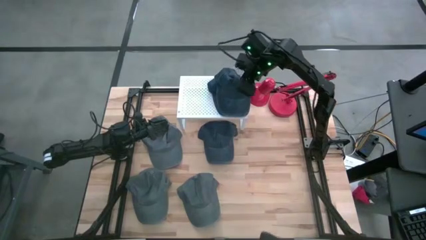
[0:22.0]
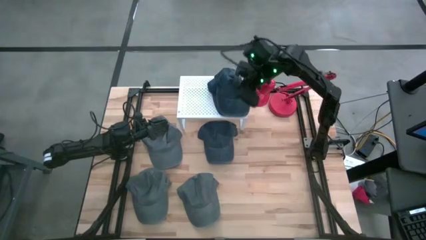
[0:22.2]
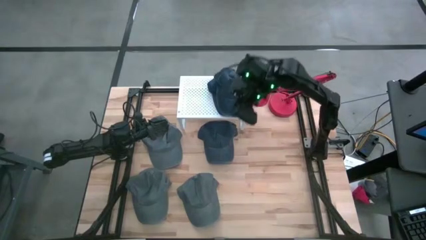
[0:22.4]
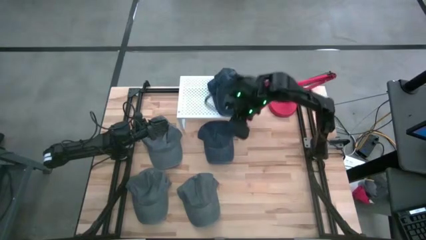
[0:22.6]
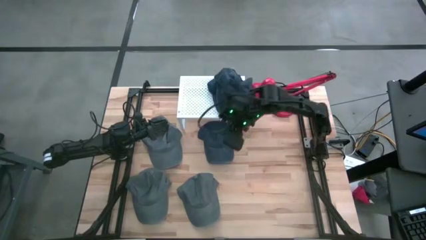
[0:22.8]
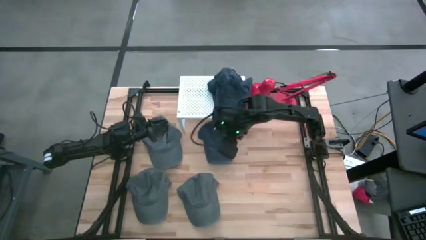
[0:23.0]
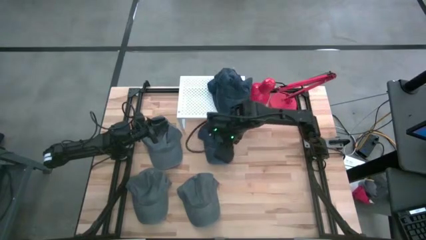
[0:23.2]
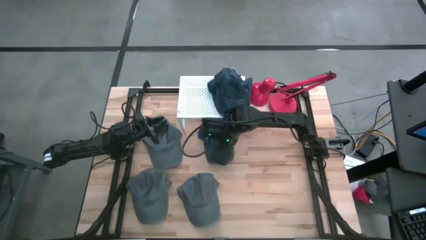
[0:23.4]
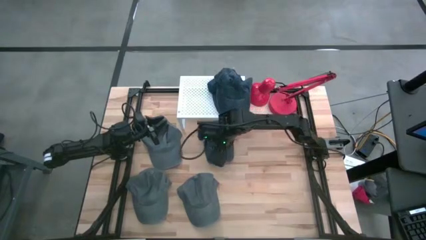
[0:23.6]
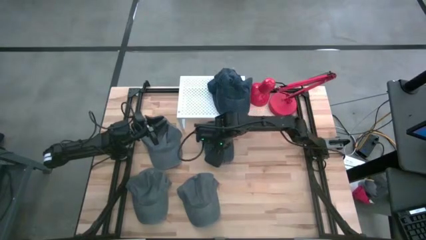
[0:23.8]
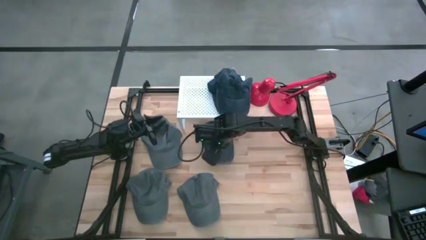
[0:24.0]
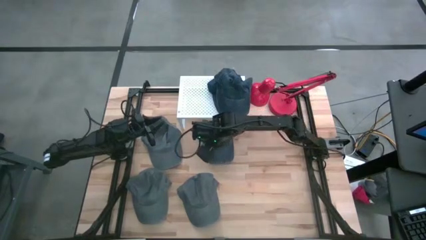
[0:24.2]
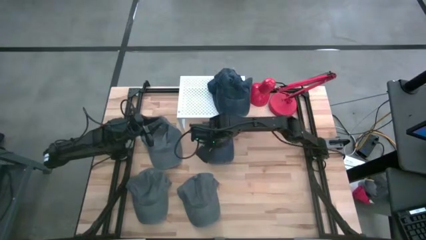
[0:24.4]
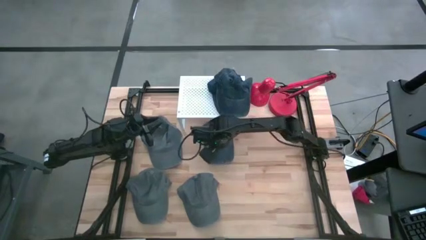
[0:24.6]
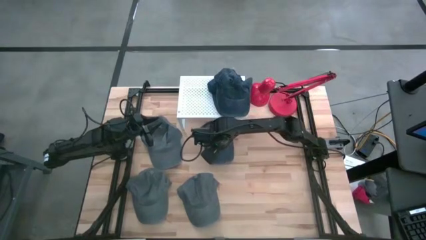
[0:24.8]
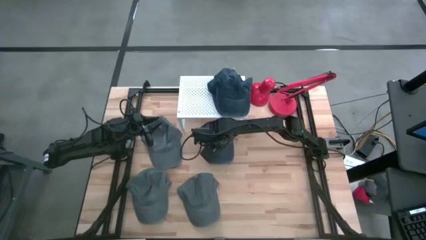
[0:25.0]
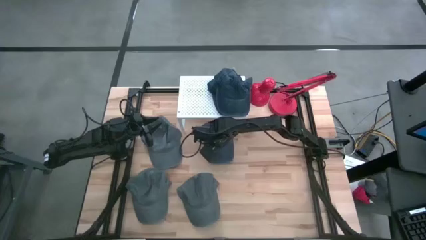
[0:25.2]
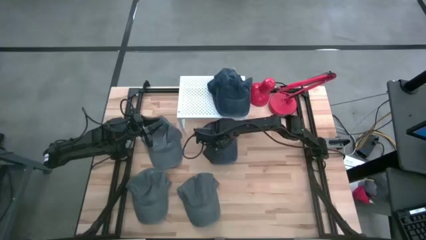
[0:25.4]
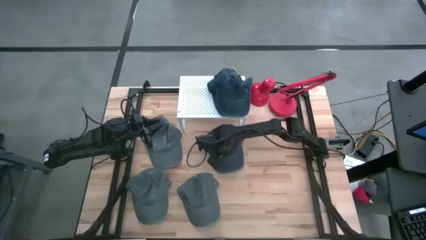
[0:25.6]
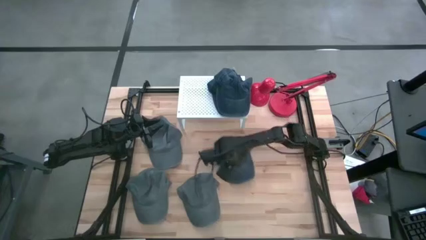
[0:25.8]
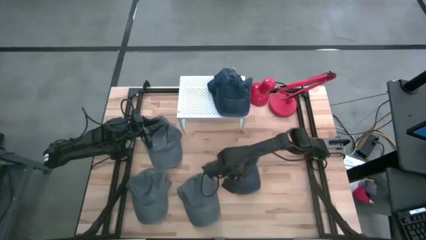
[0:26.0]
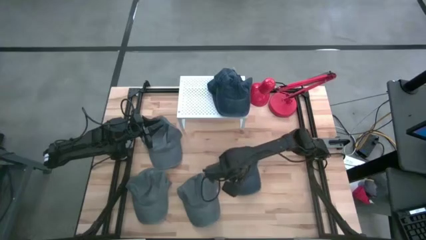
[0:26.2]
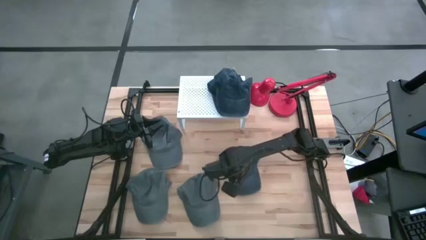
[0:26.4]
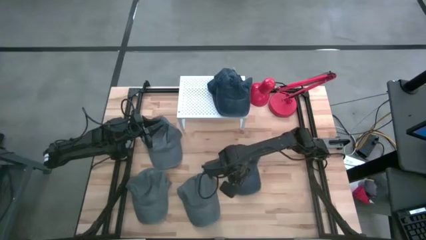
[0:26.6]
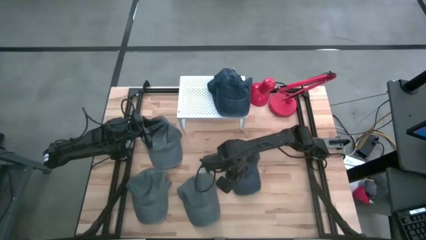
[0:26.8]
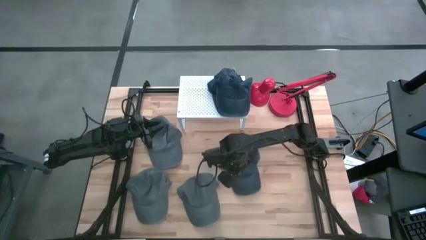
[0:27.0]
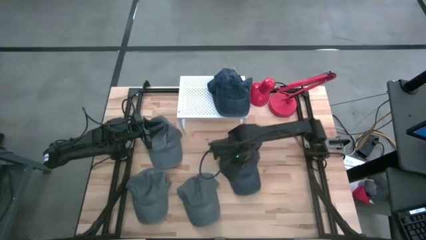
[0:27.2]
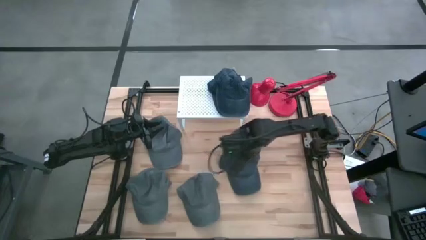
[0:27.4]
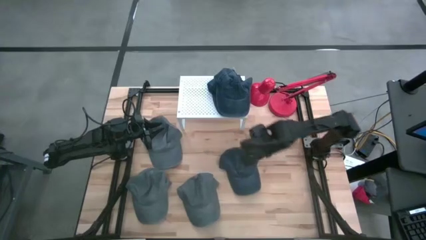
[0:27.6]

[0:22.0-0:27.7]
Task: Pick & Place hat
Put the dark blue cap on top of the other dark blue cap on the shelf

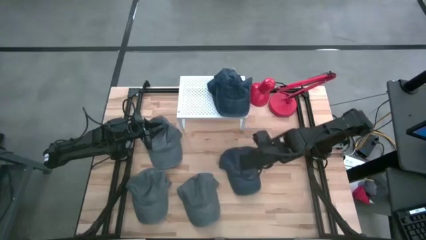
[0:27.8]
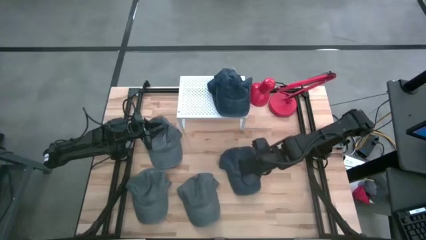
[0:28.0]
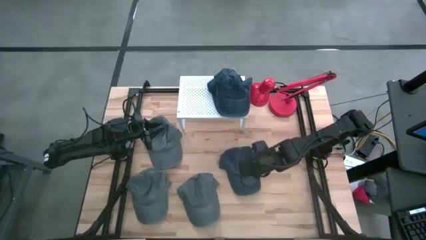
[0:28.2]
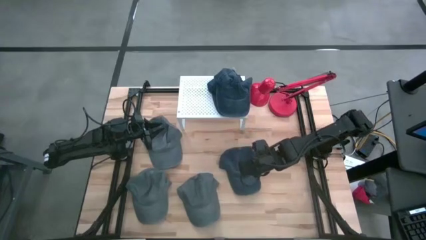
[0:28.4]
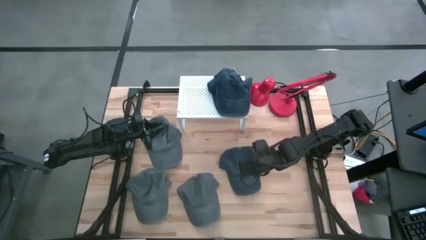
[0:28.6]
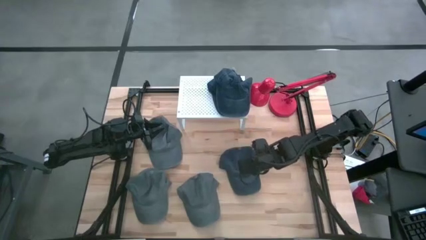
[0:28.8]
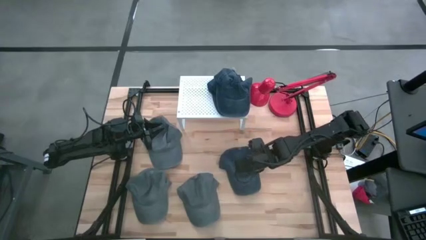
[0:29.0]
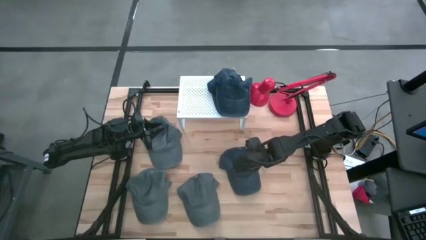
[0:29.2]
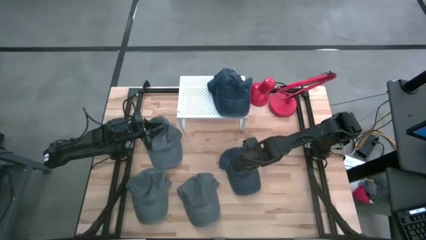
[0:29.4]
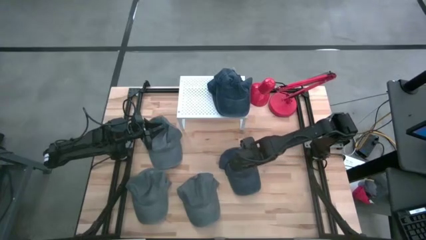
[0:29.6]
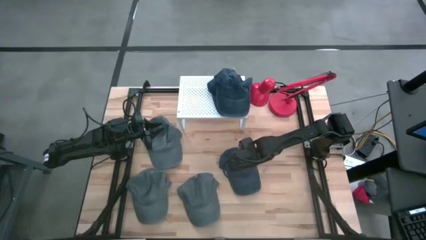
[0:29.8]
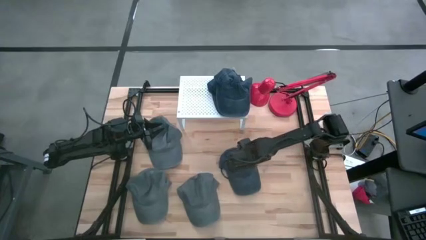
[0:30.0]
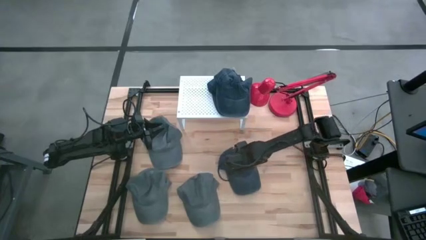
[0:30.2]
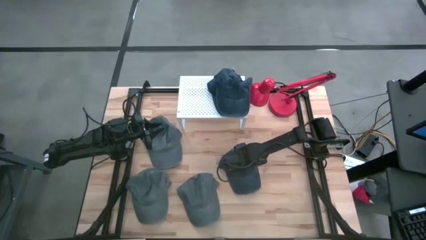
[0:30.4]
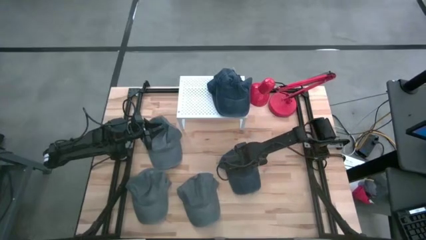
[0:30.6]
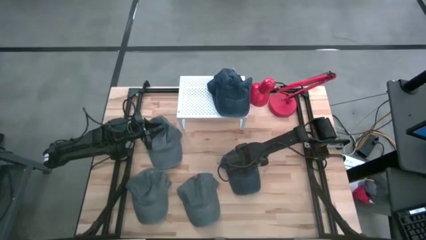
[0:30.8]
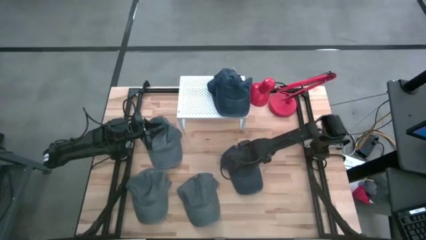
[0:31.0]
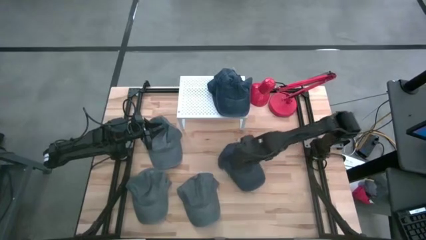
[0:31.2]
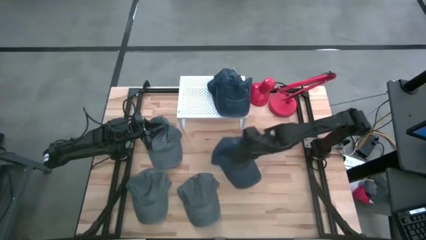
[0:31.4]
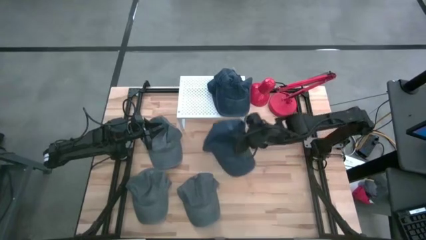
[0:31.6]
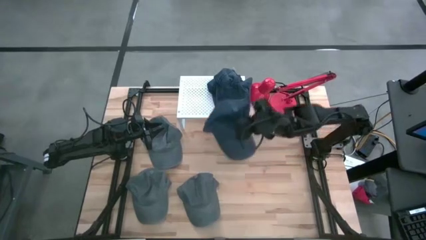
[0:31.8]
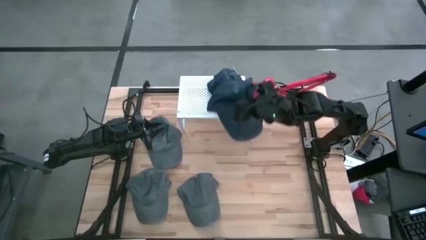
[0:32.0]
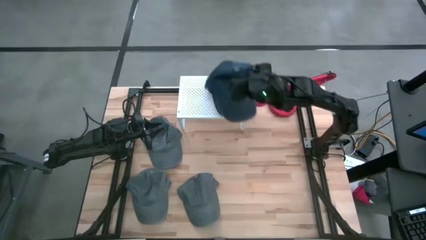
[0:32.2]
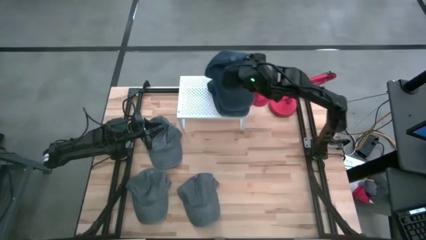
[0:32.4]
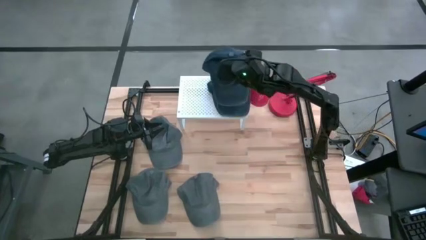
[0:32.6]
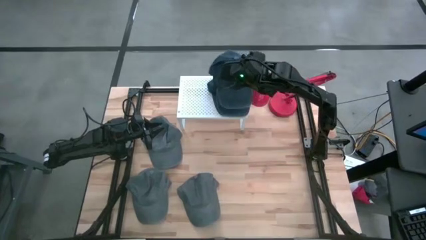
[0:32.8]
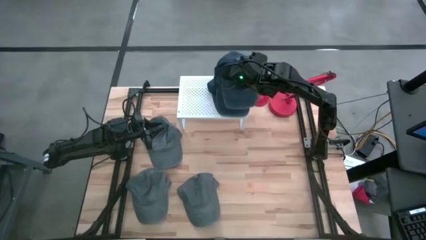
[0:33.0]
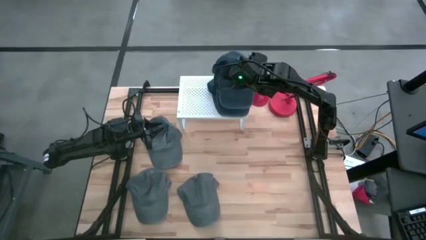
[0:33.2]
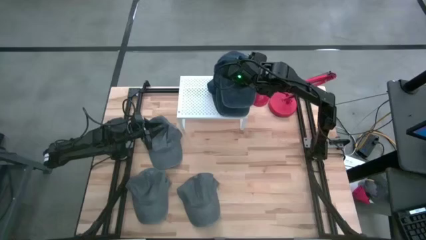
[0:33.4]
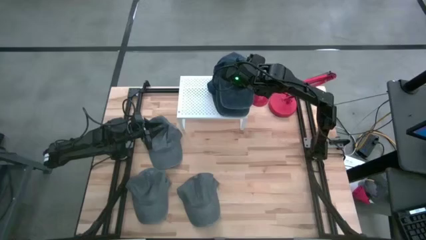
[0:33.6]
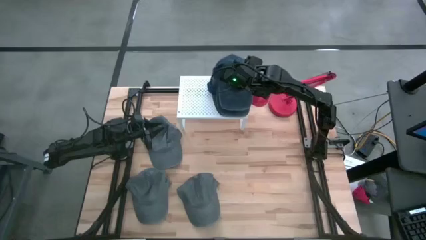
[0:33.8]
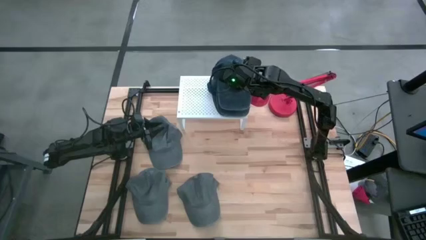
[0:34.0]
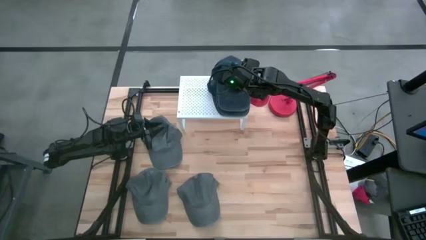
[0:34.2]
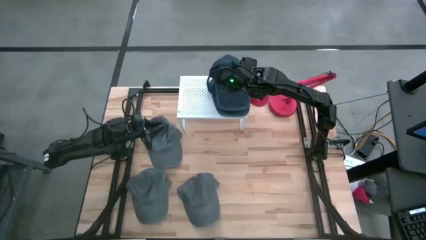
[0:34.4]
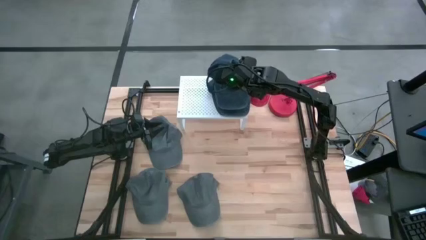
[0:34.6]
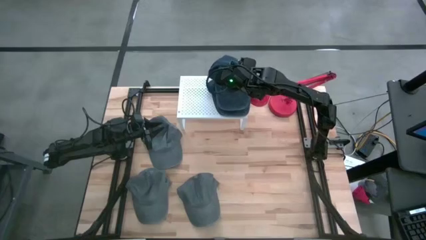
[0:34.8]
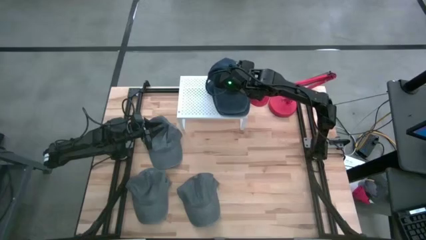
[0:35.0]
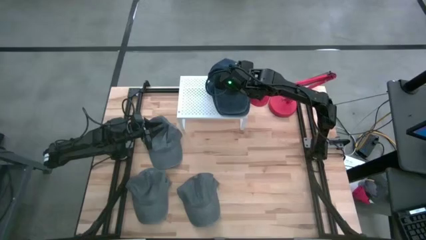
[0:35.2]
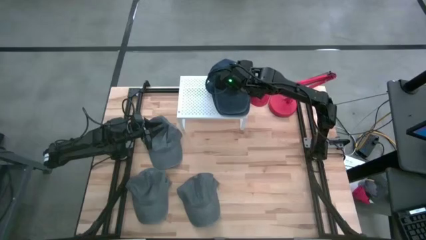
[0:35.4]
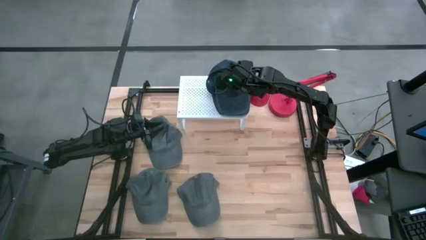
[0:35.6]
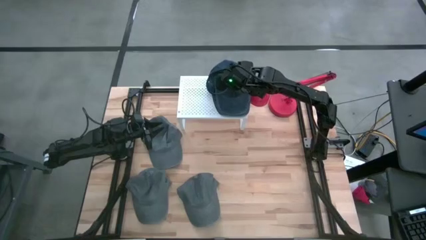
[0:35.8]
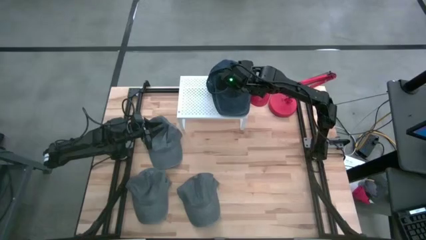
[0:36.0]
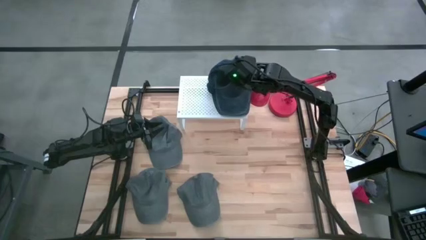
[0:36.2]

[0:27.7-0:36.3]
Put the dark blue cap on top of the other dark blue cap on the shelf

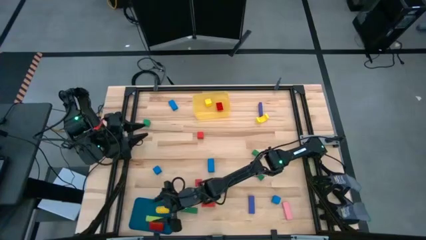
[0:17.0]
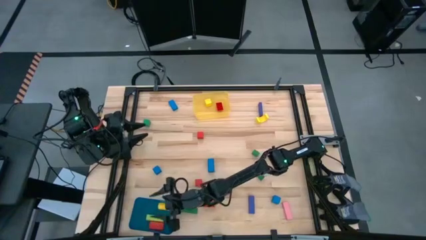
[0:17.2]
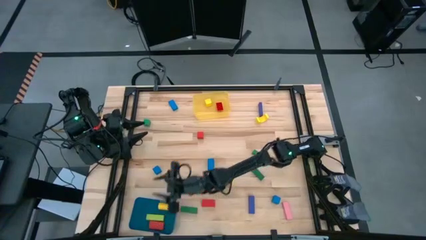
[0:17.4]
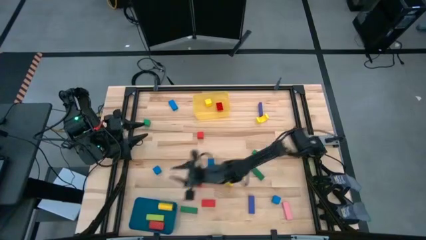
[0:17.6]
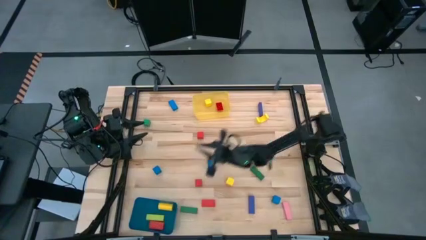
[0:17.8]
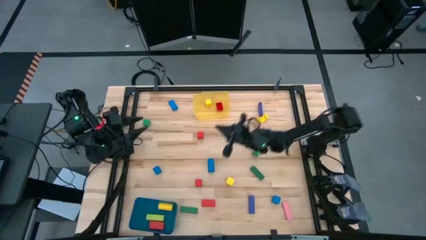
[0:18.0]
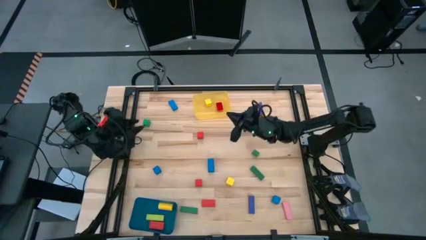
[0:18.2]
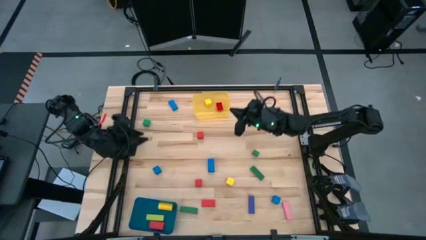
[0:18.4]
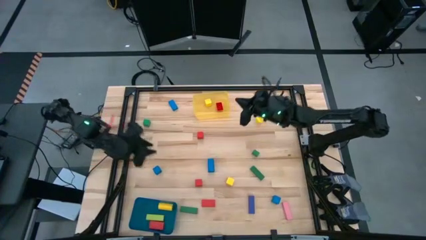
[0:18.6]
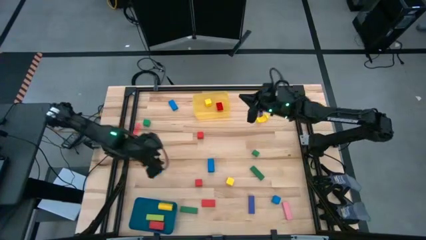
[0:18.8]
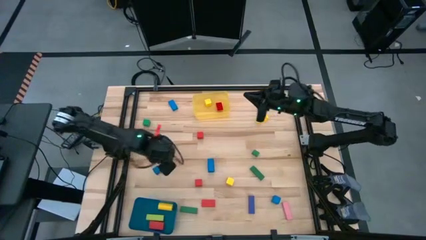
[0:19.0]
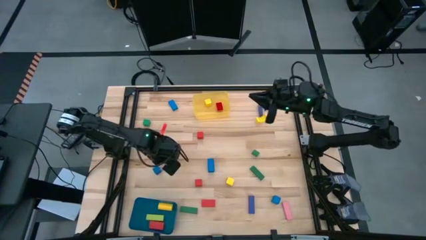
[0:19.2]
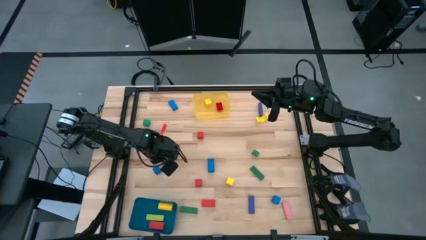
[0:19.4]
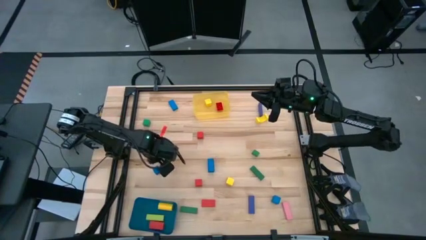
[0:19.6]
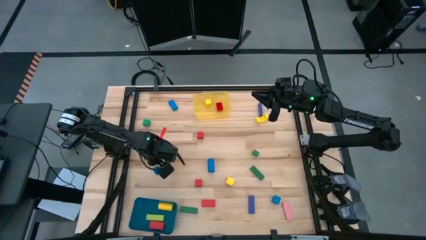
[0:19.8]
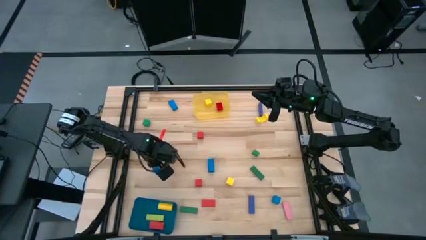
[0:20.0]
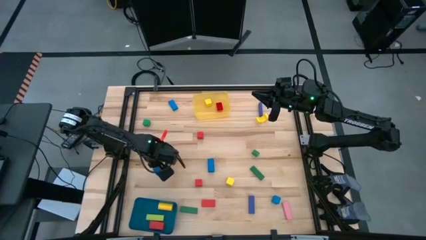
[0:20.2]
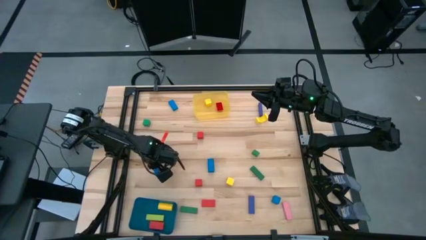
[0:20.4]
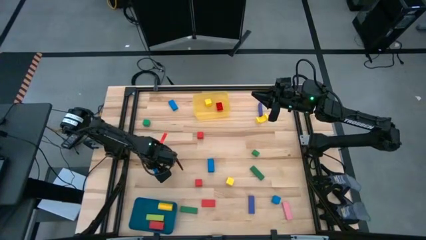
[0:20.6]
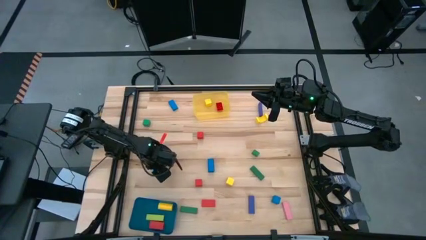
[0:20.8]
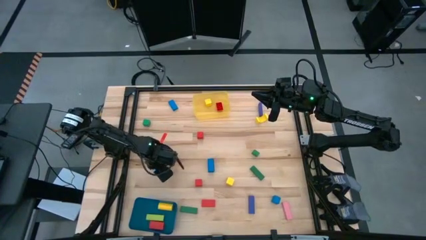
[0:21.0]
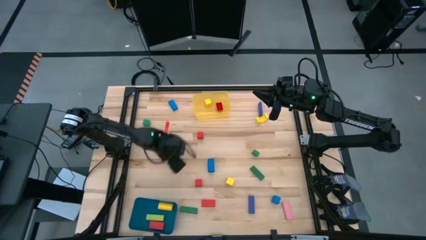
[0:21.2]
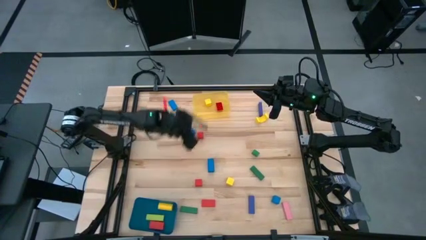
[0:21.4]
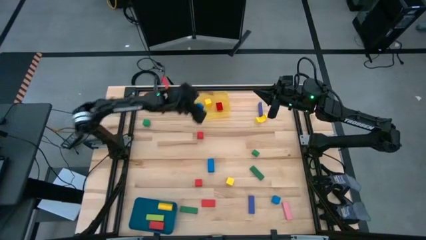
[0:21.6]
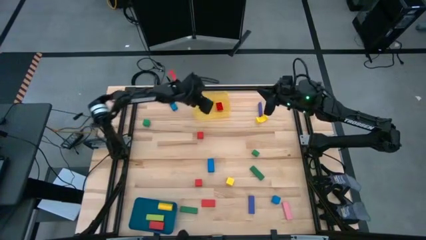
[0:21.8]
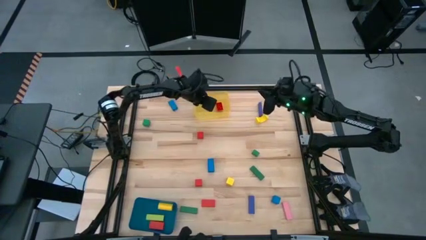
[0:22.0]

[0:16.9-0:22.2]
Task: Sort blocks by size
Put the blue square block into the yellow bin
